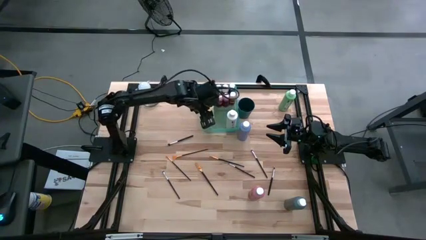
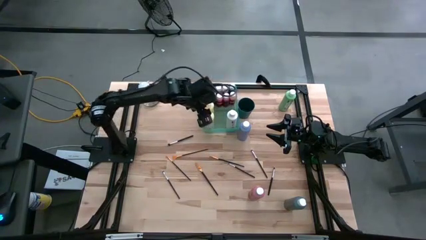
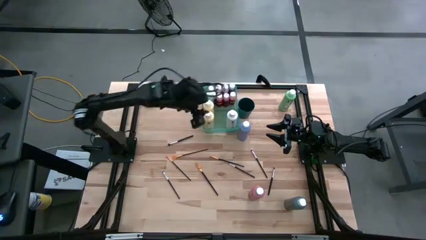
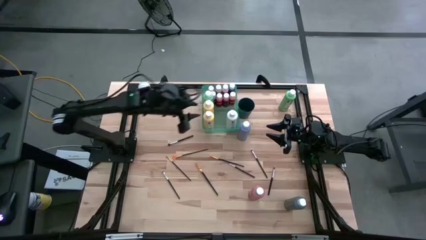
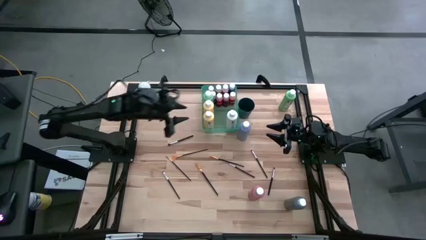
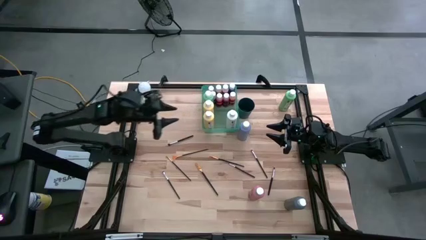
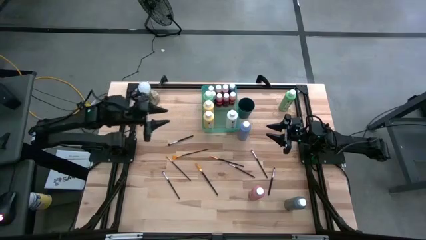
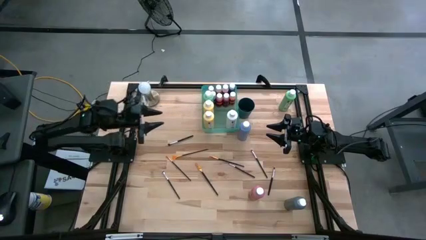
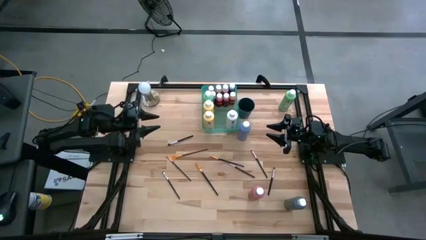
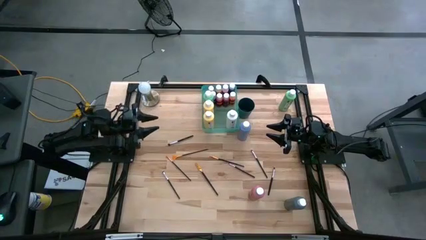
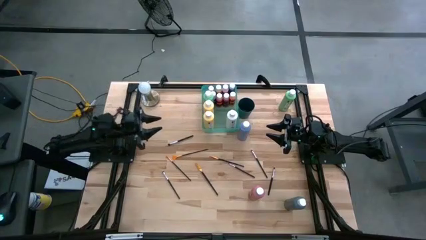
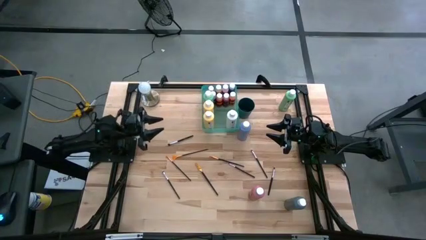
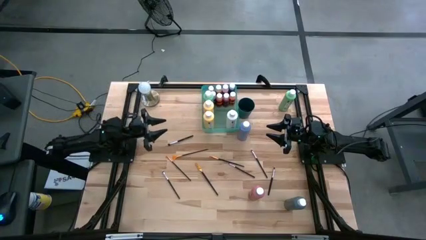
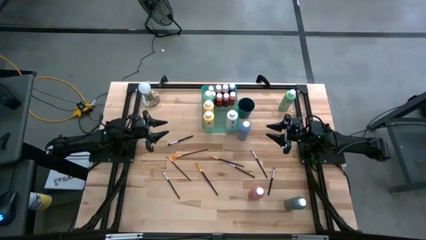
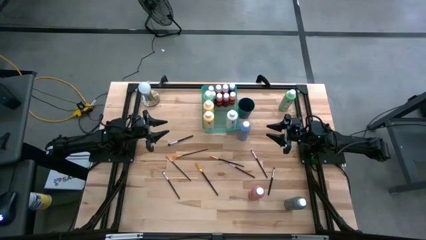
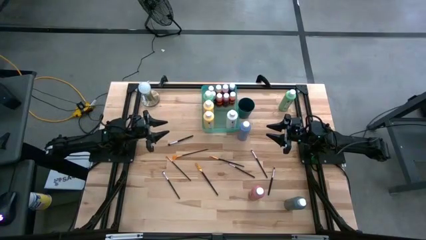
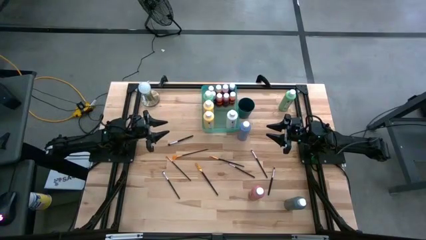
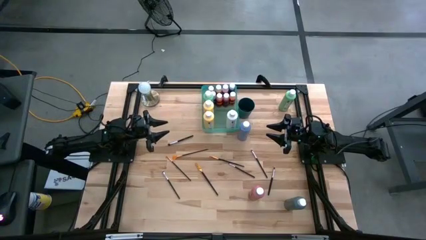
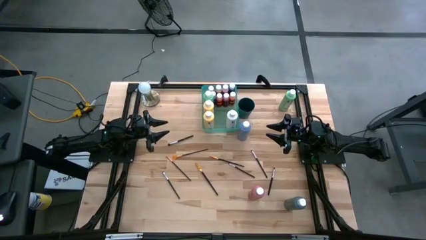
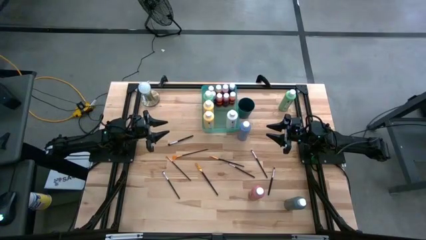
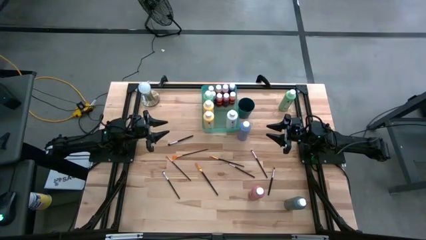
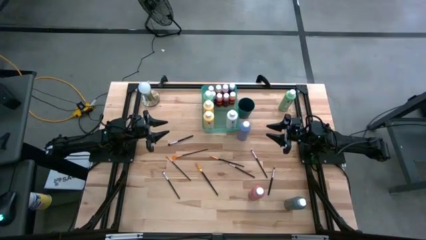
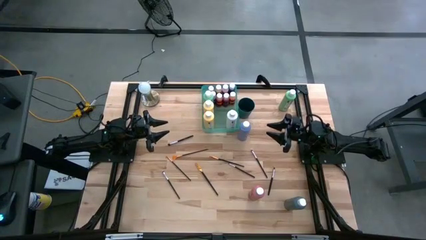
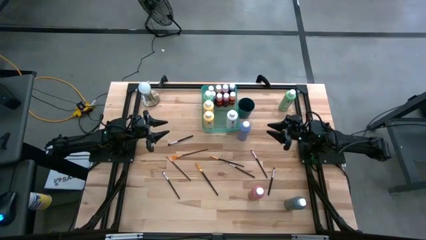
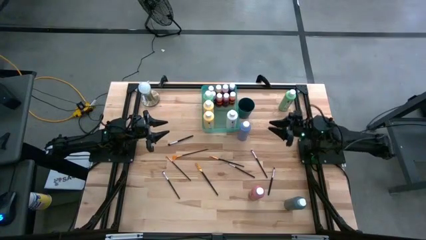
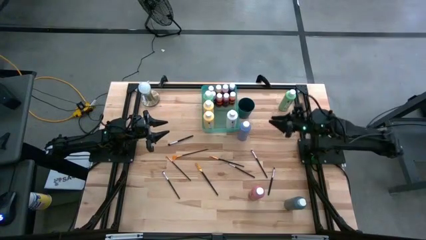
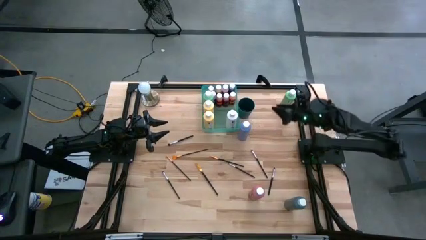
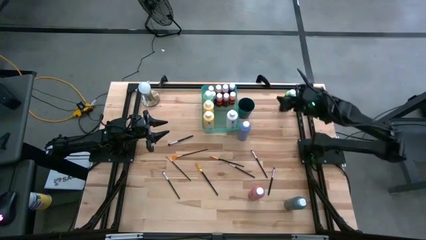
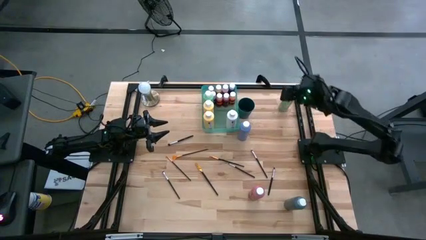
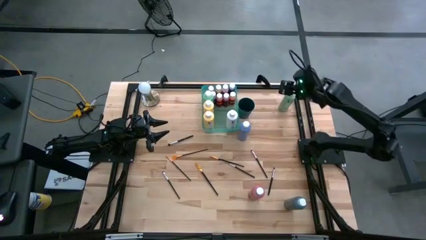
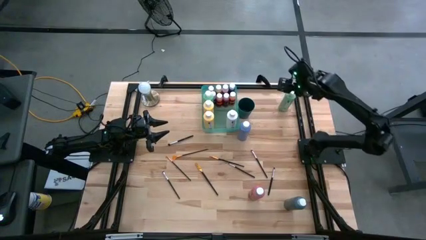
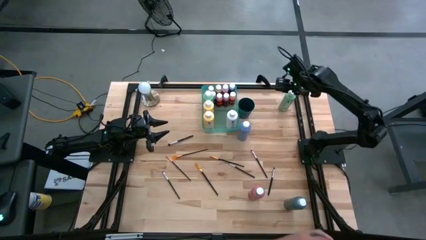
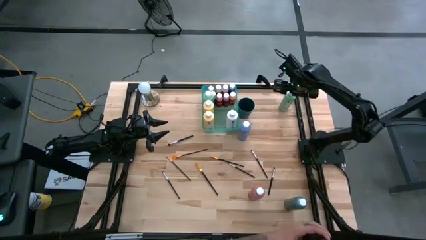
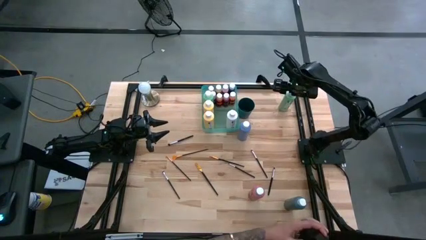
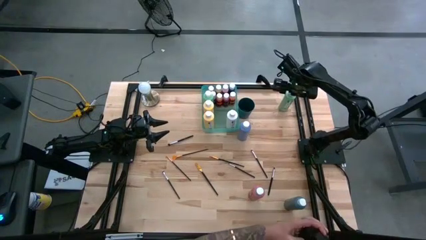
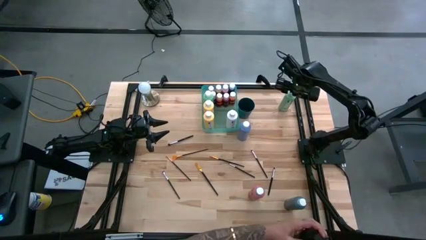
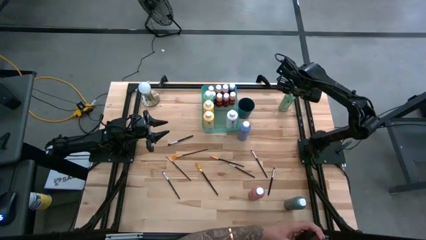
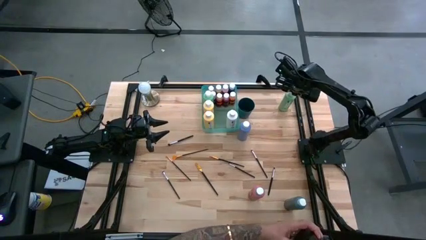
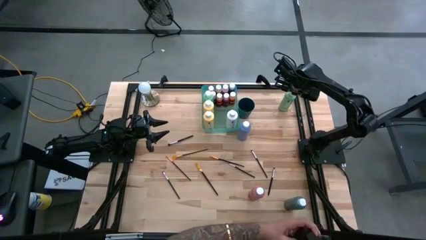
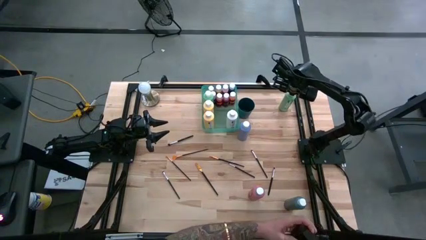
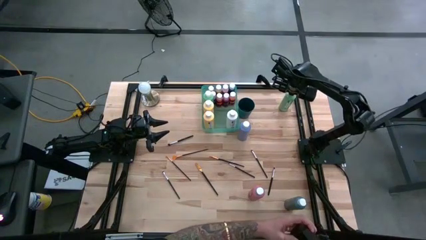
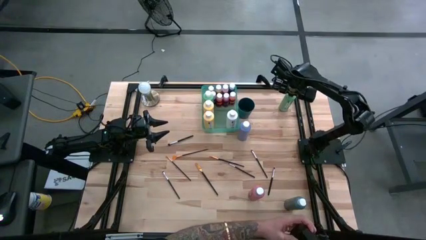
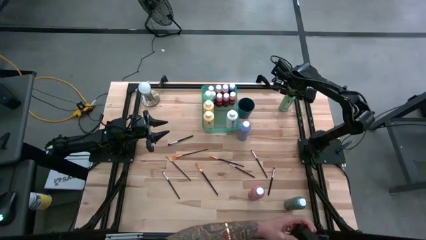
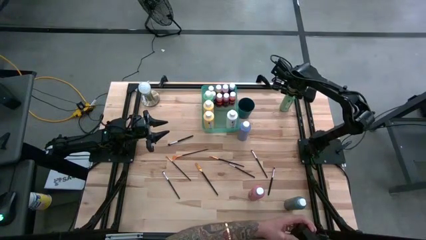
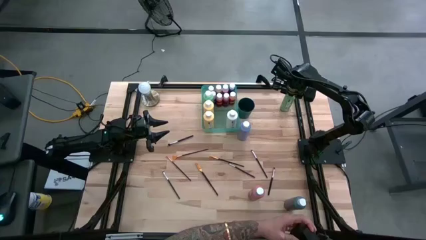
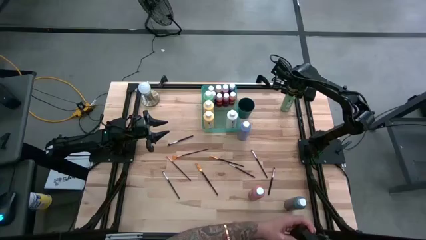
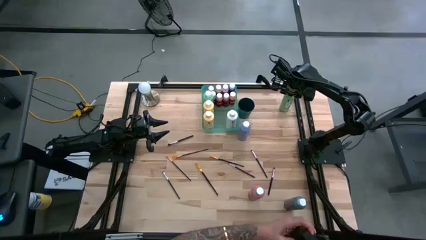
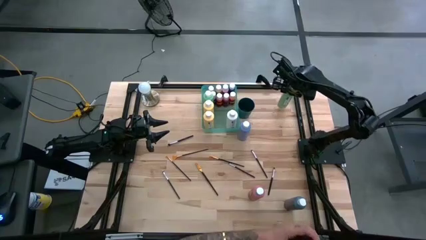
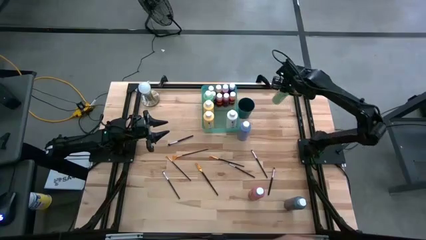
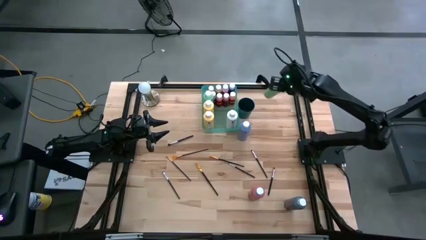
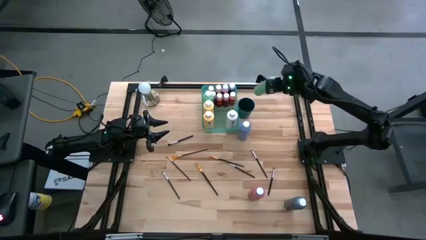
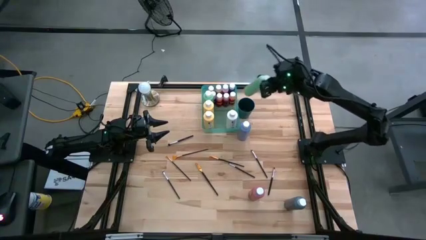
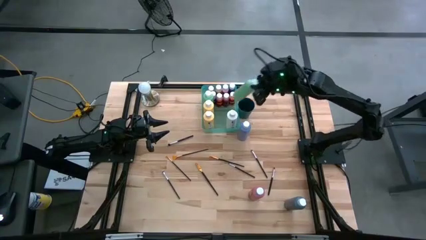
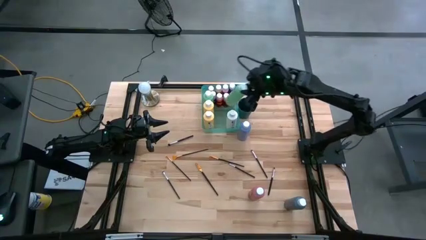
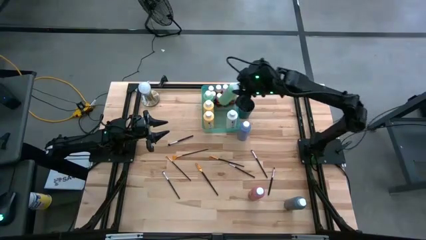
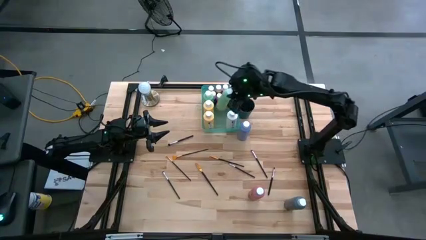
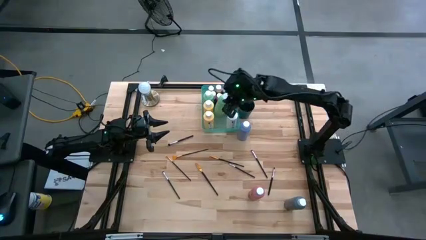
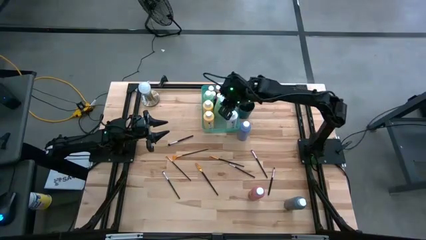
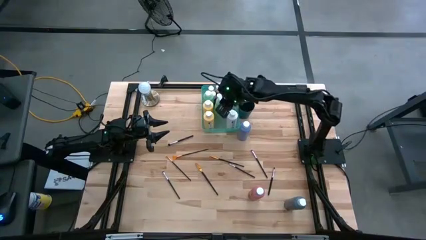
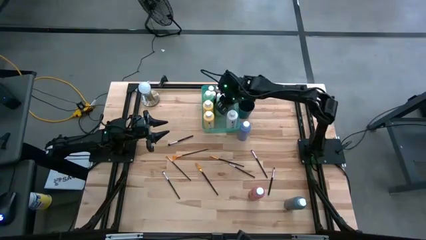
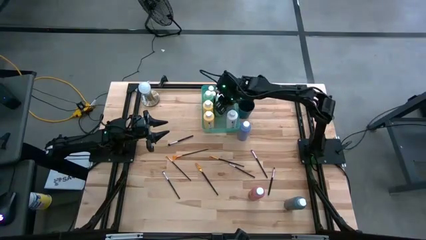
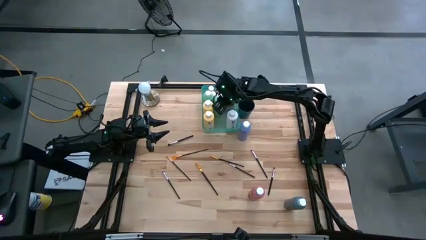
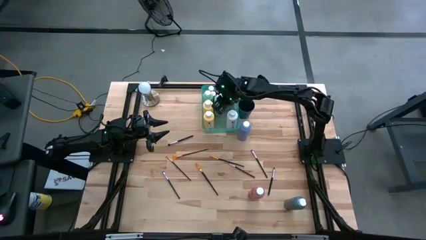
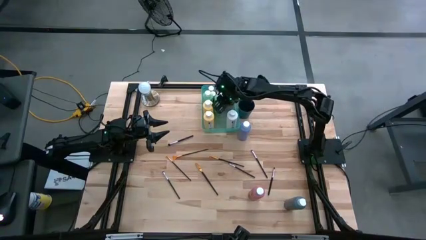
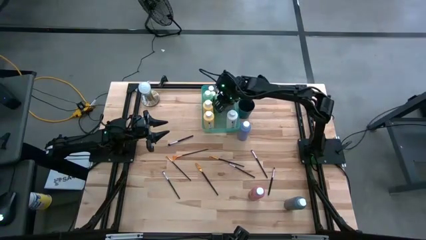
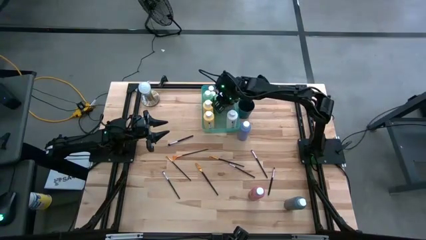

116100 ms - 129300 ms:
Task: Pick & Place Paint Supplies
Put the light green paint bottle into the green bin

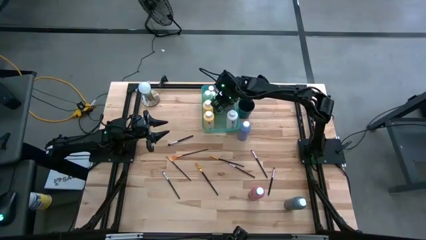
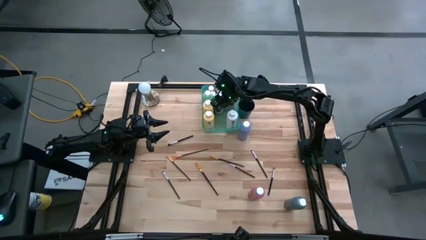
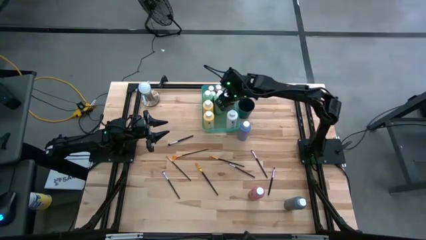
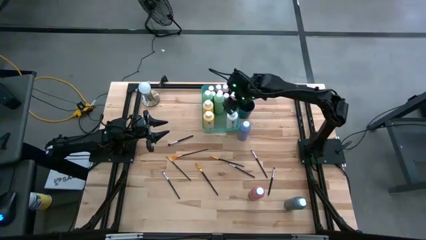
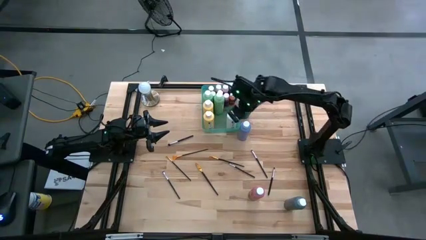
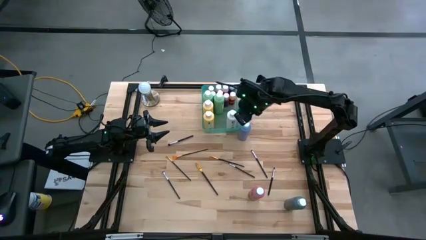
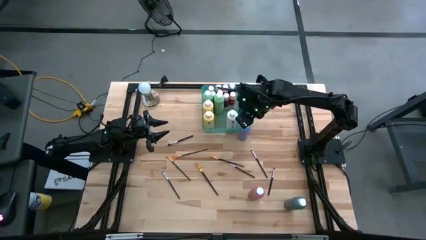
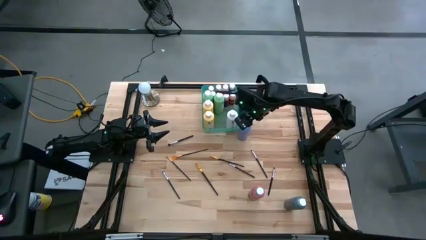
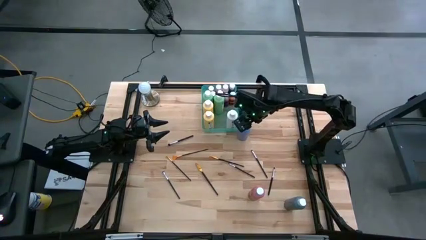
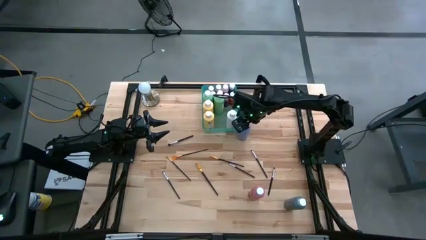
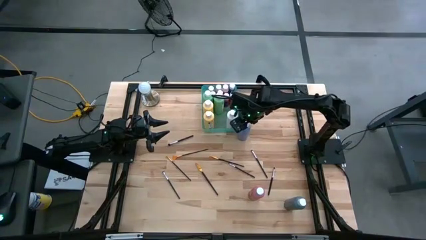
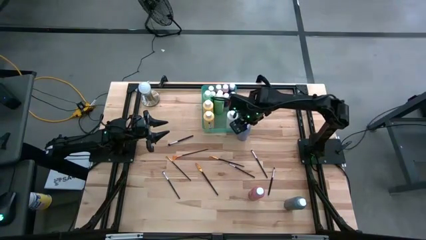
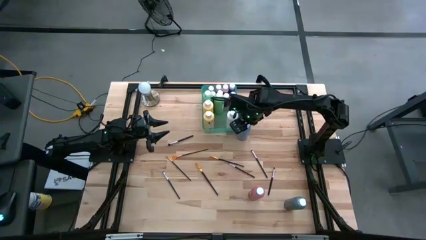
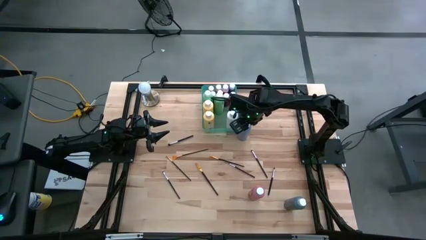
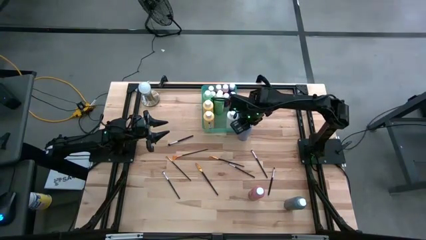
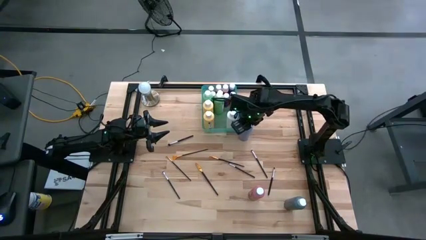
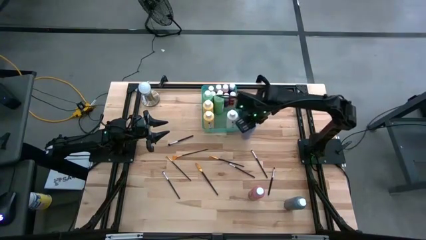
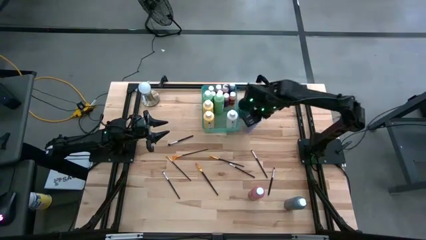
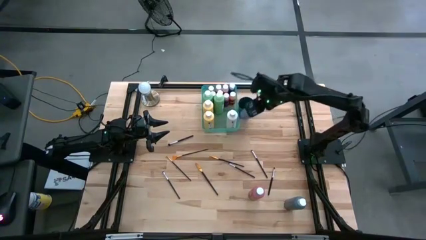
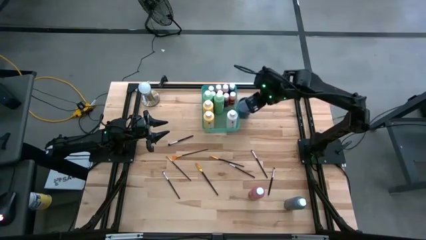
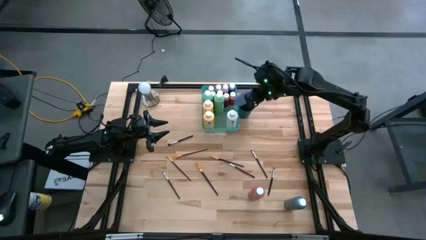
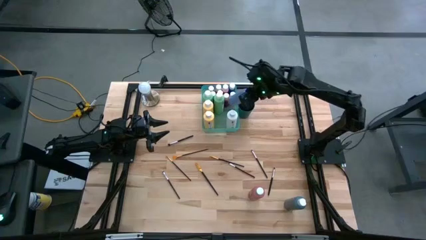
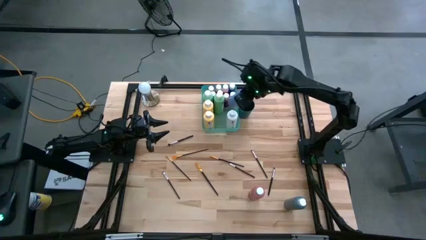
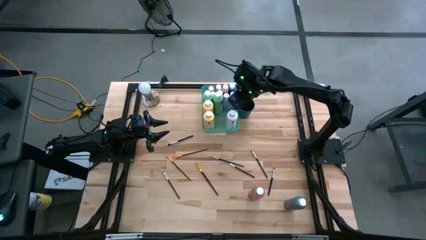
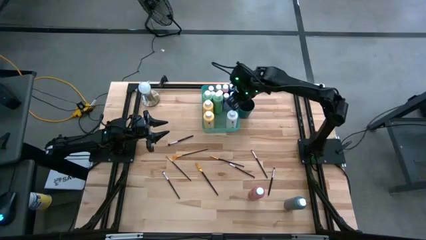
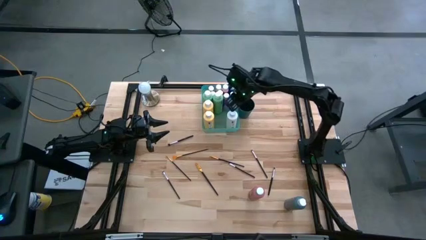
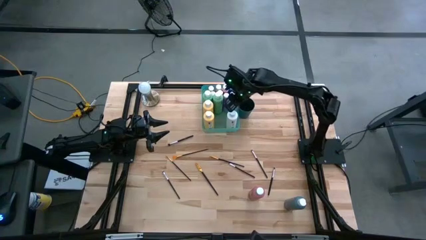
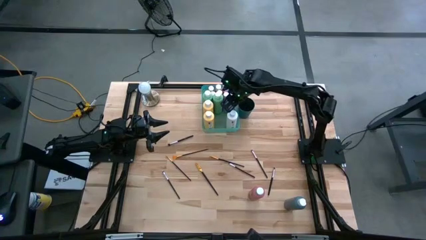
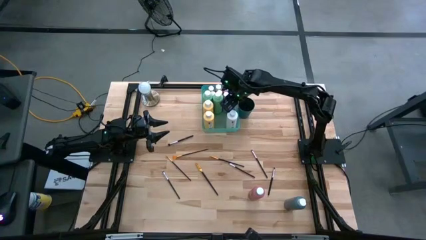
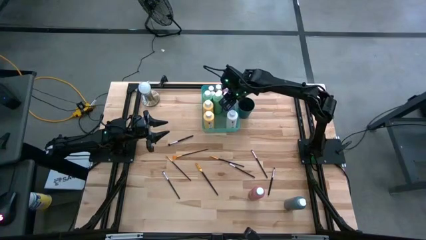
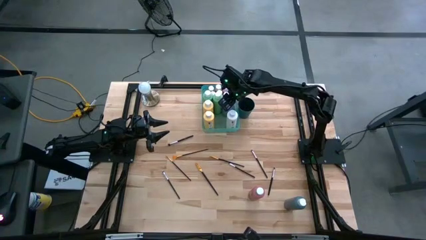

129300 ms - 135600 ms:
Put the purple paint bottle into the green bin
